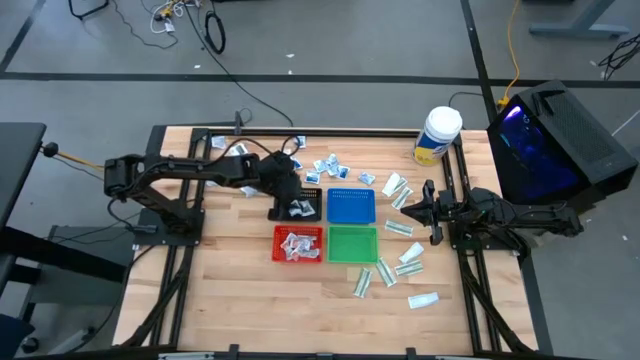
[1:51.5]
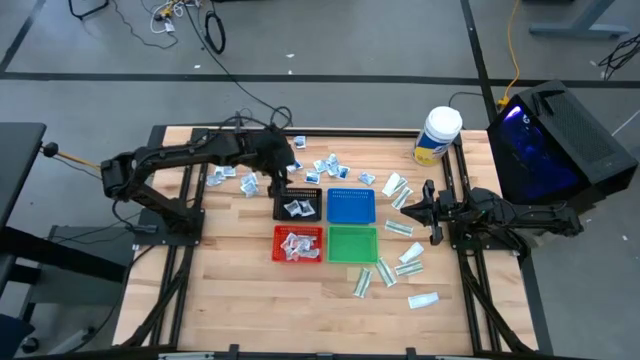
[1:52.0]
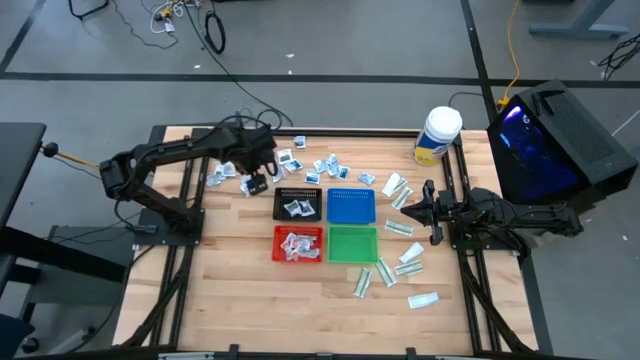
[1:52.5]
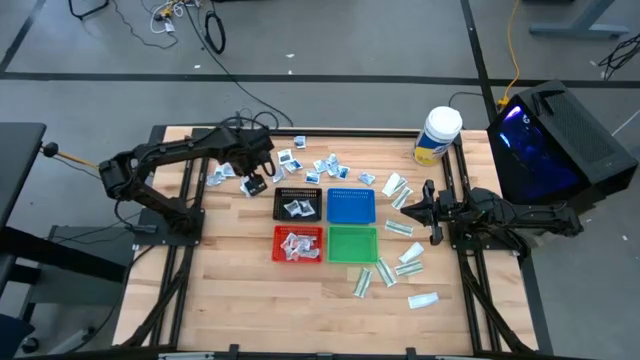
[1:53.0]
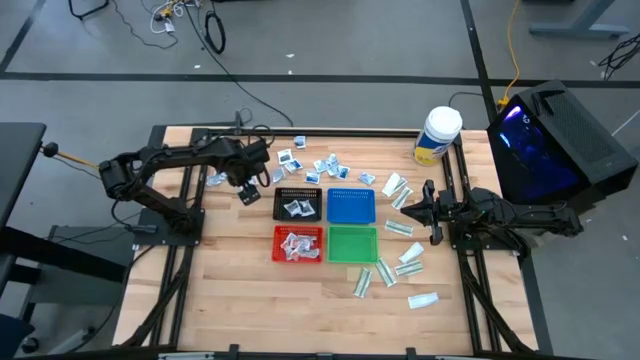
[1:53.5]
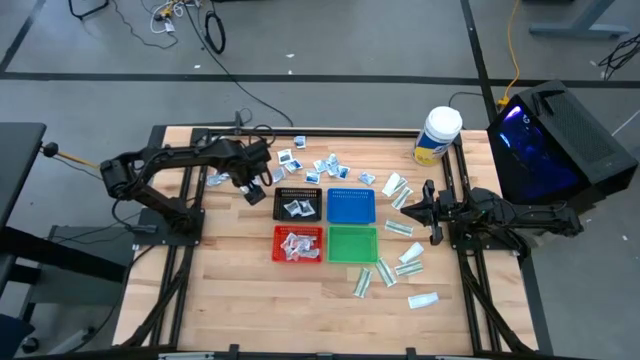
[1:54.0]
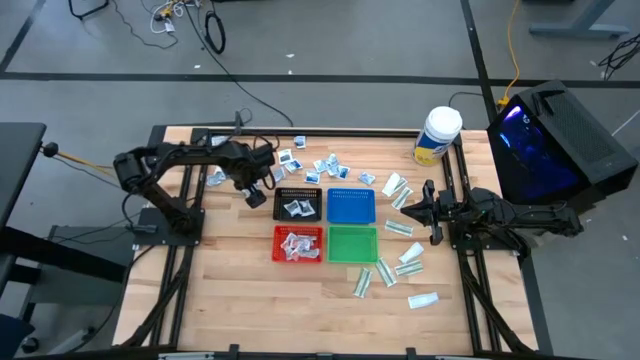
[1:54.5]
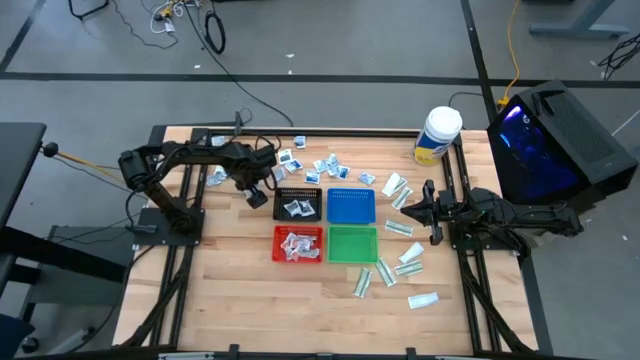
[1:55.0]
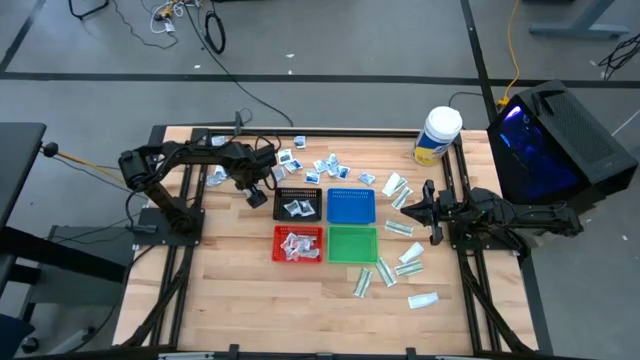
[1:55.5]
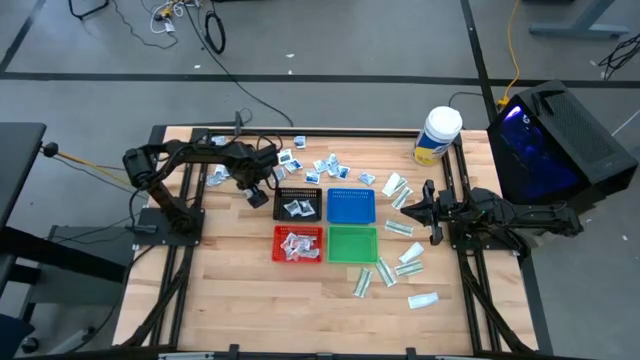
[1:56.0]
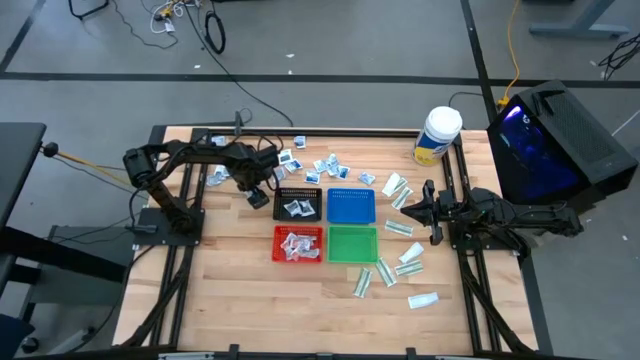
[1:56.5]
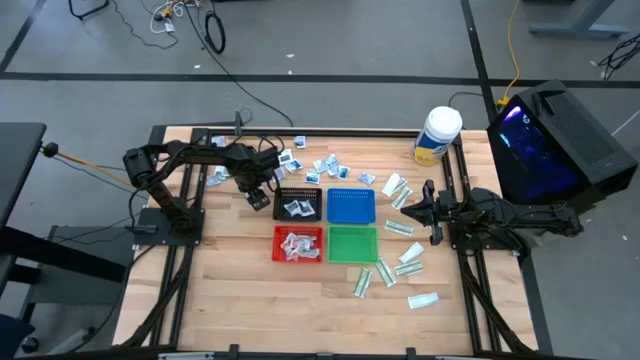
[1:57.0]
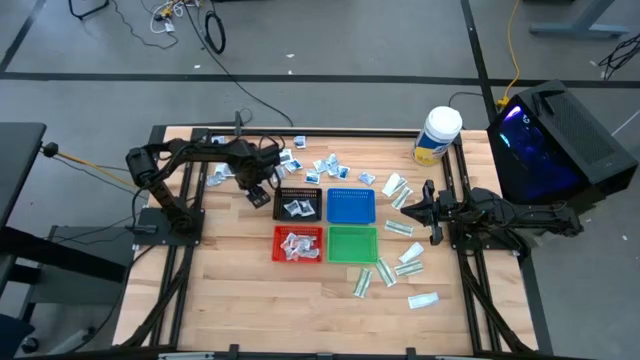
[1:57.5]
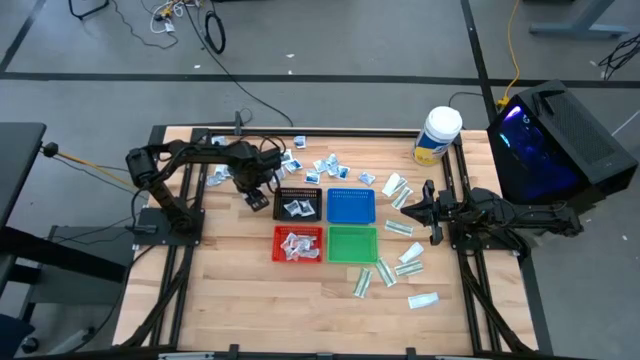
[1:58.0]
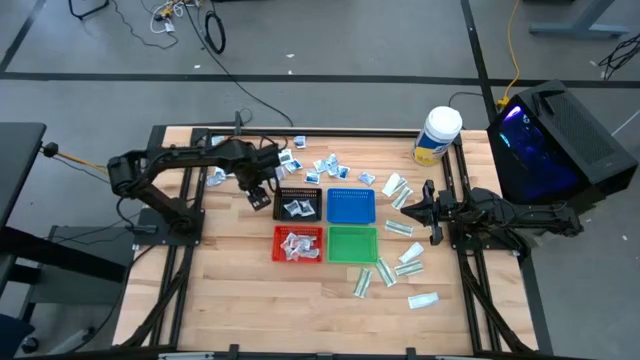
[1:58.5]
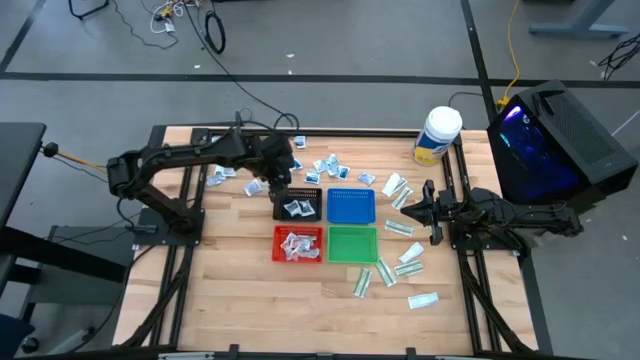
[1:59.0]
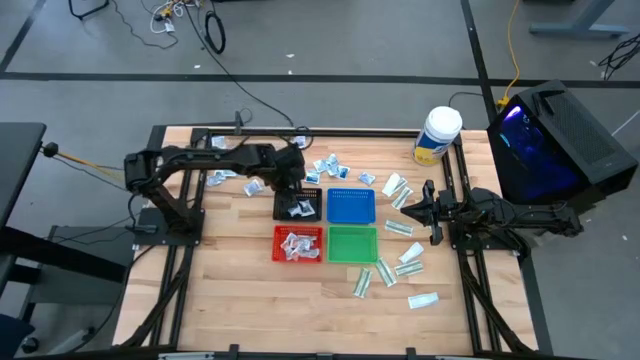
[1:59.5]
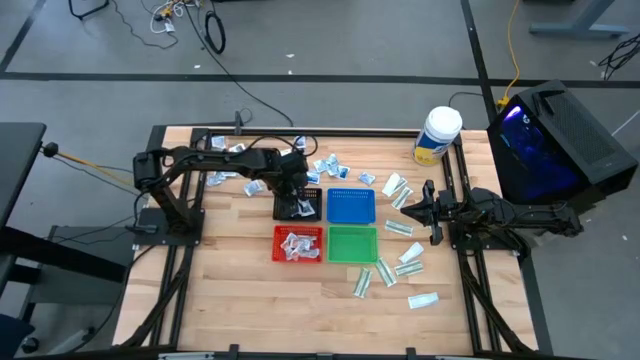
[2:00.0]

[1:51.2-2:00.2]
Task: Pick & Place First Aid Supplies
Put the gray towelette pack into the black bin

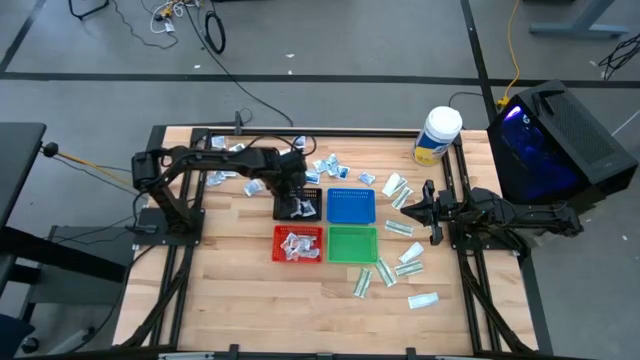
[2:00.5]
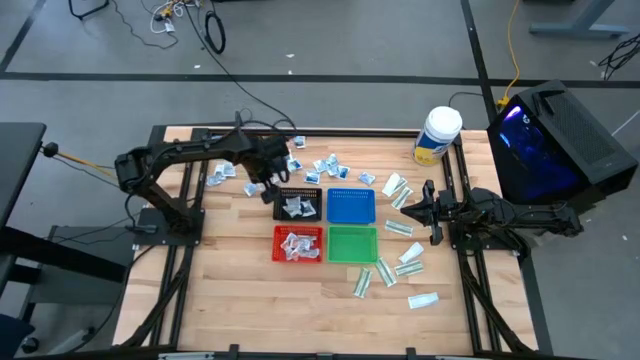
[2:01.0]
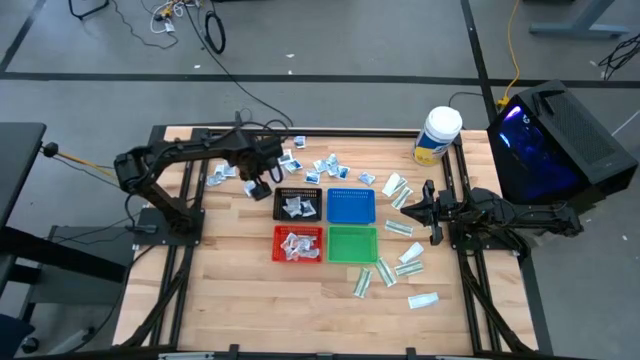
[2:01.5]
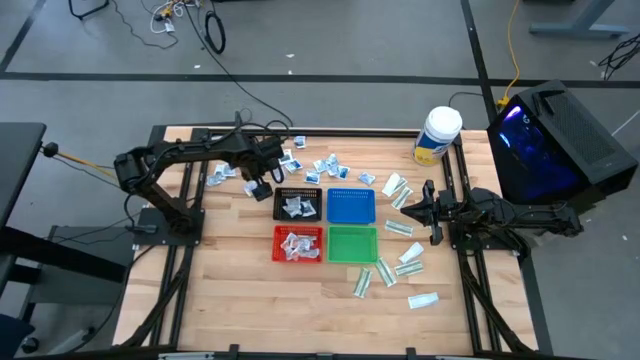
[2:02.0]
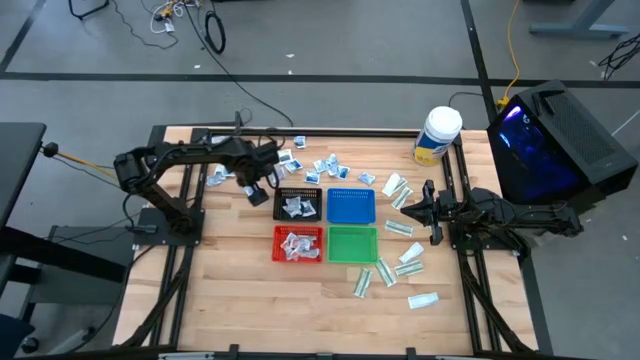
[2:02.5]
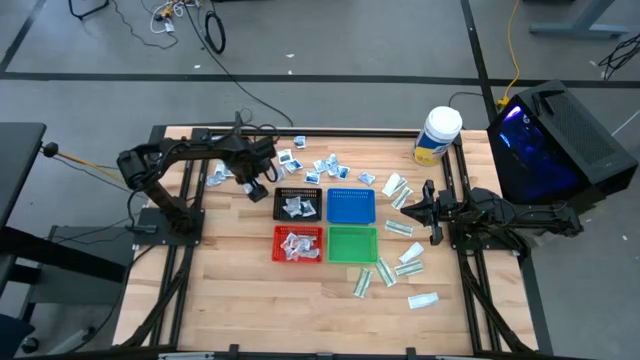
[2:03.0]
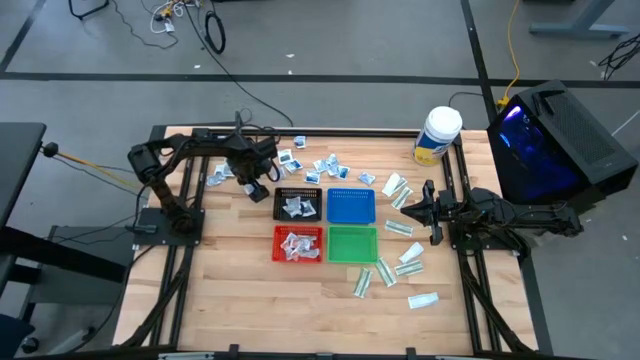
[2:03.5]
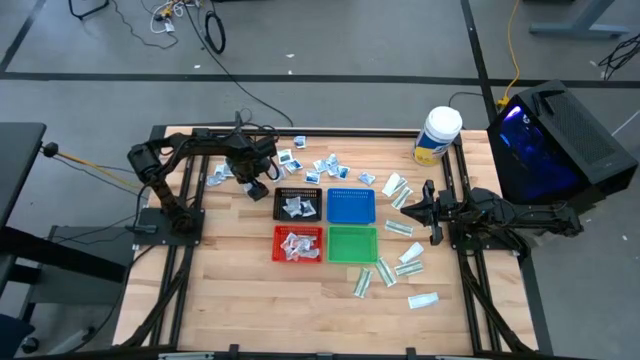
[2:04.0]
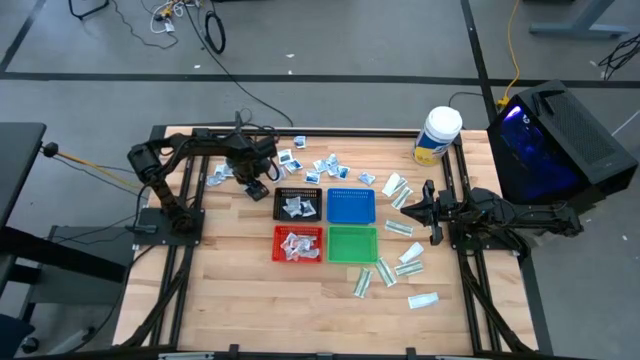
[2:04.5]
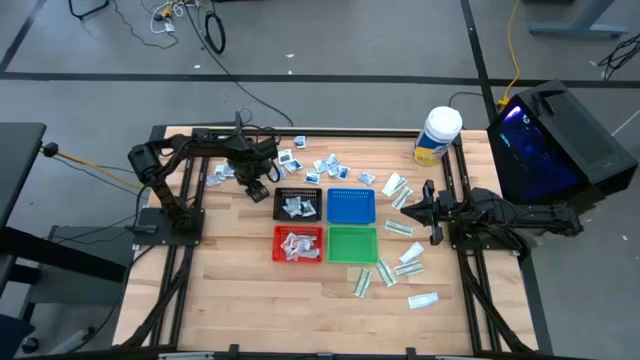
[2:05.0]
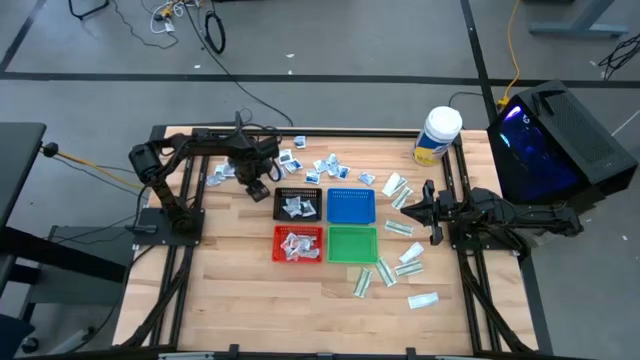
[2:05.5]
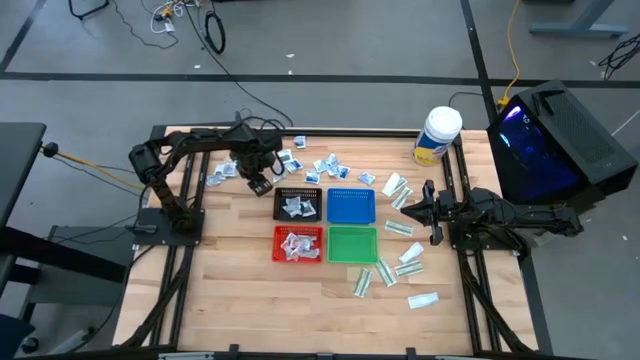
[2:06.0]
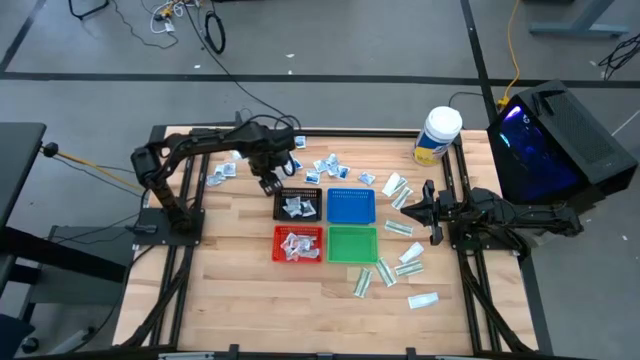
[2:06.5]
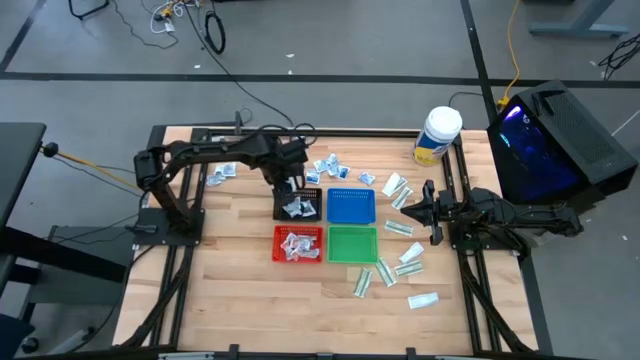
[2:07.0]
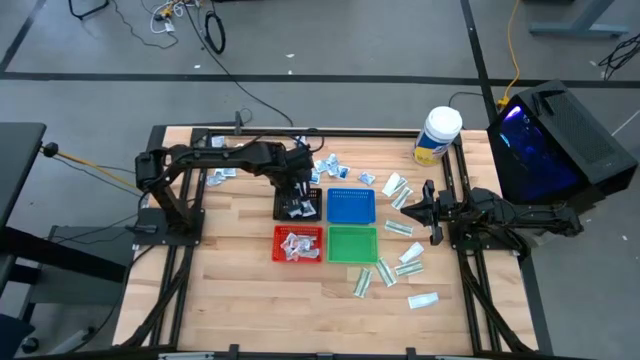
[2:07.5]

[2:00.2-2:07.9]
Put the gray towelette pack into the black bin

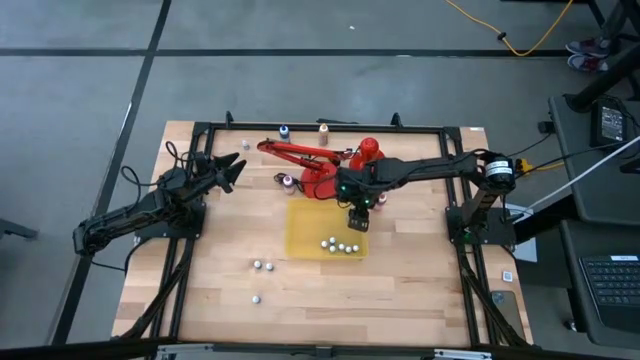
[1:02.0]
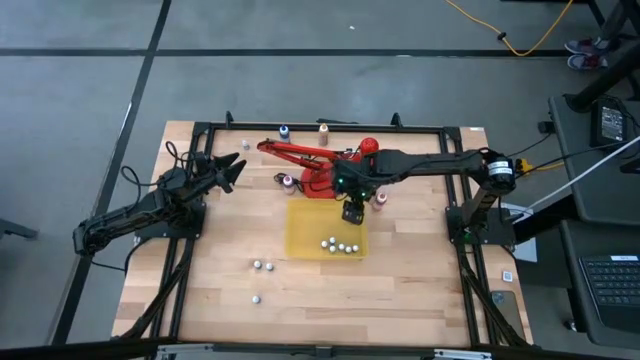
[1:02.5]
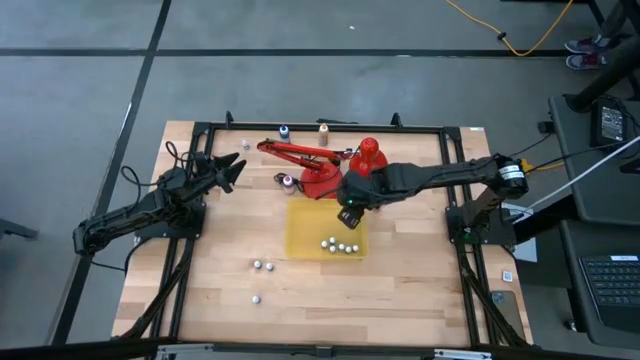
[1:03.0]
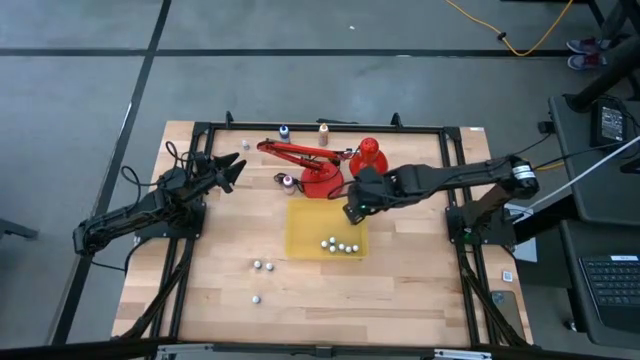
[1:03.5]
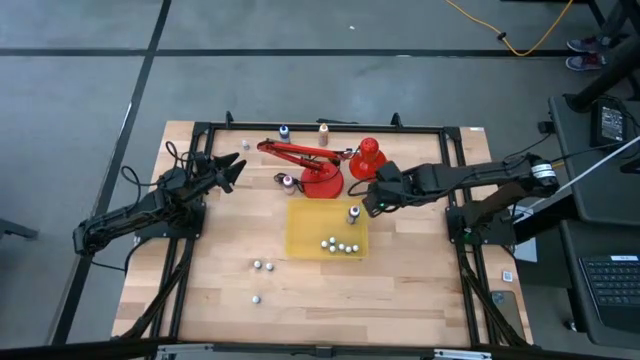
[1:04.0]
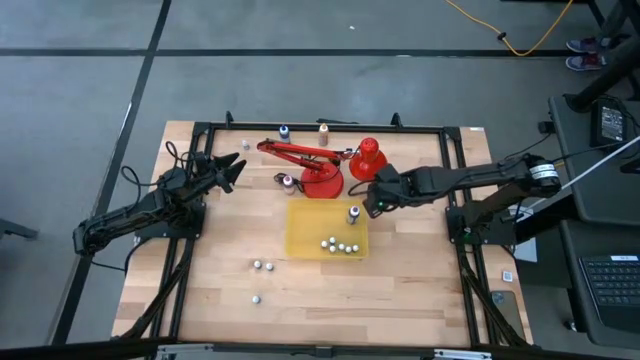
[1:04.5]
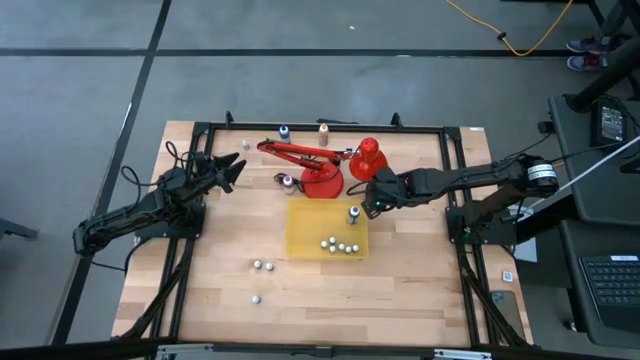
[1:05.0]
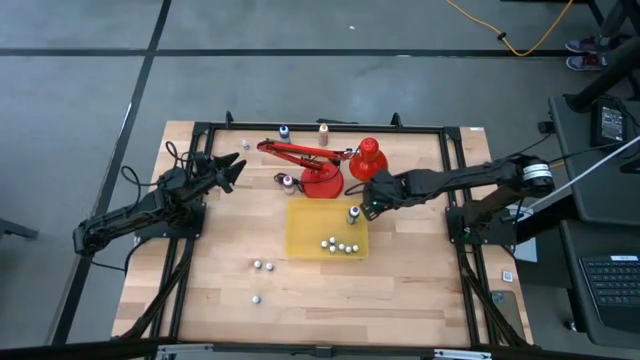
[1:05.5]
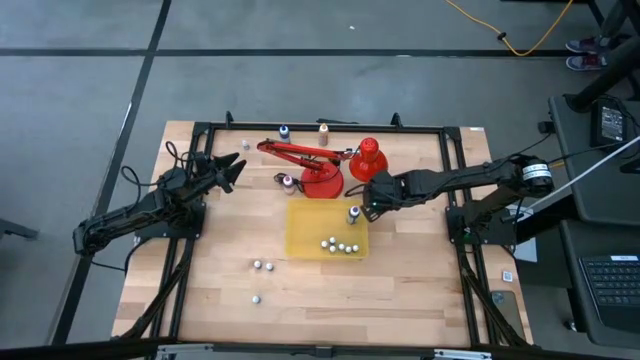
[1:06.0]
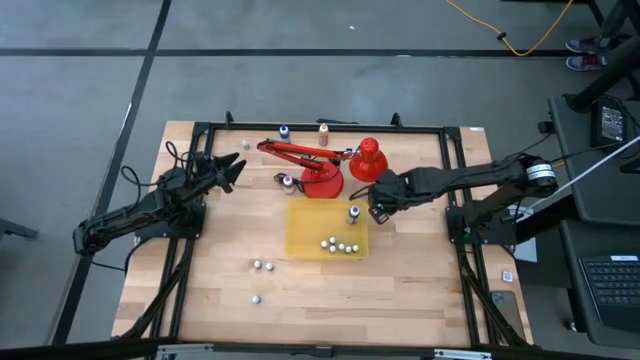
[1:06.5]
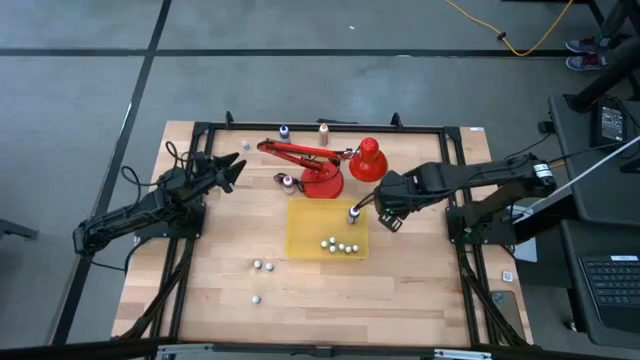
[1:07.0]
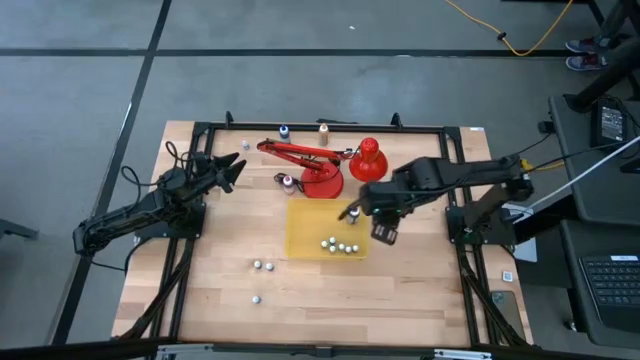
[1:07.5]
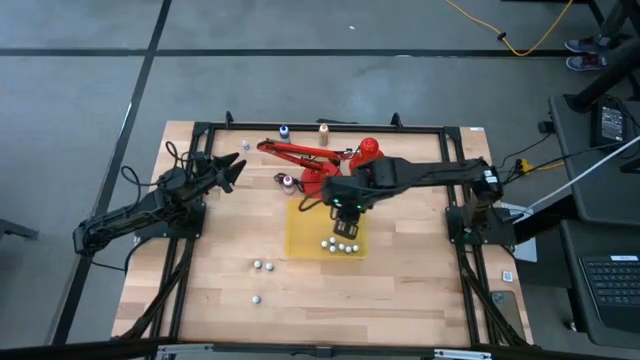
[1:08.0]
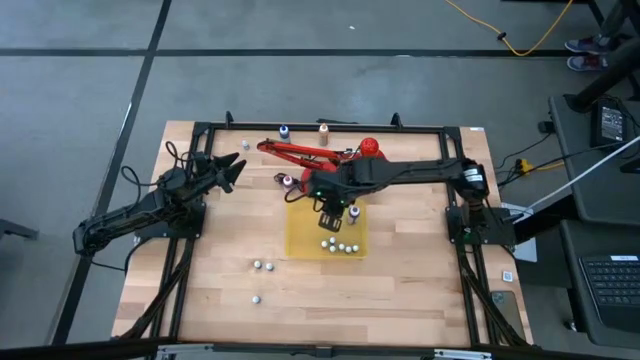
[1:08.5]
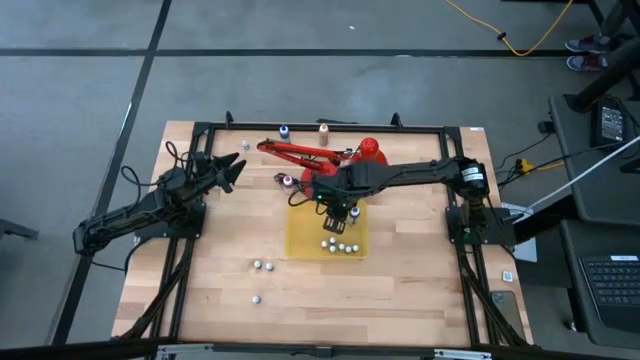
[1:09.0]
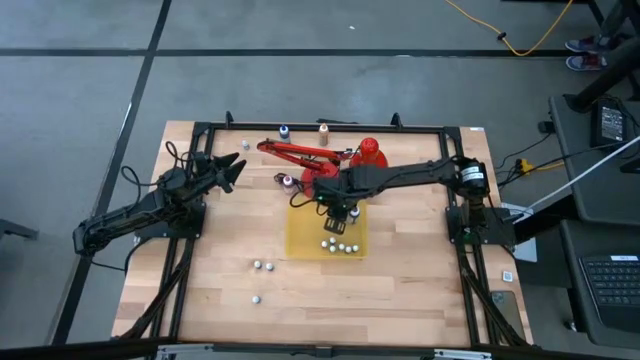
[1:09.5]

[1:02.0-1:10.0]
Task: Pick & Place food coloring
Put the big orange food bottle into the yellow bin
